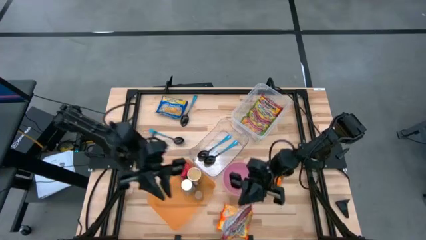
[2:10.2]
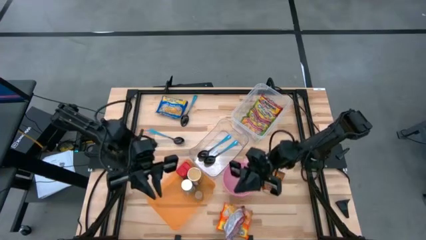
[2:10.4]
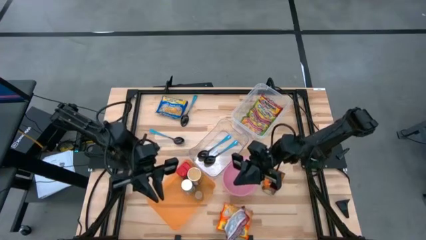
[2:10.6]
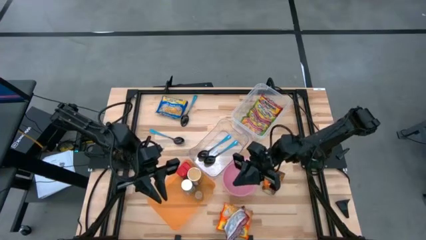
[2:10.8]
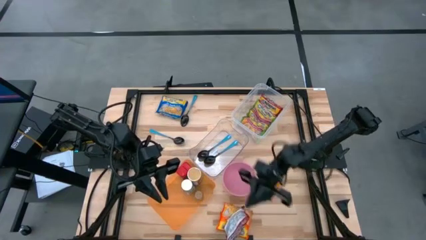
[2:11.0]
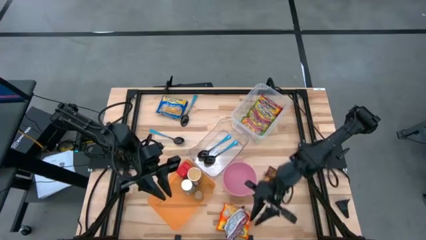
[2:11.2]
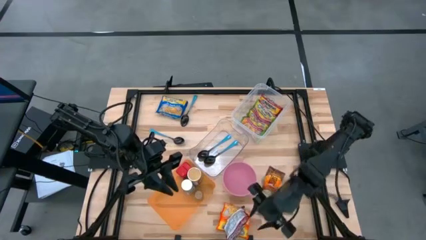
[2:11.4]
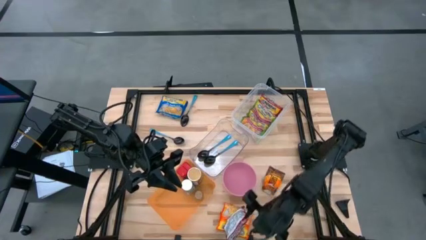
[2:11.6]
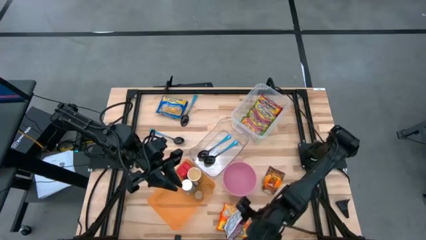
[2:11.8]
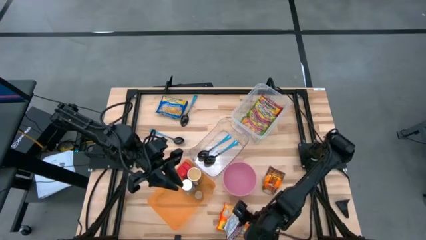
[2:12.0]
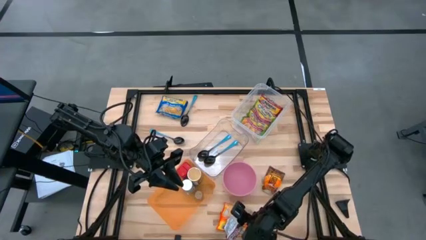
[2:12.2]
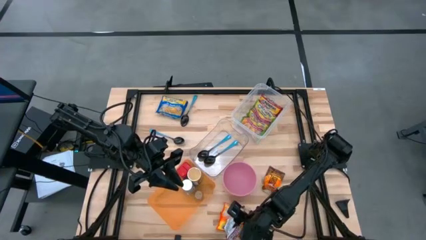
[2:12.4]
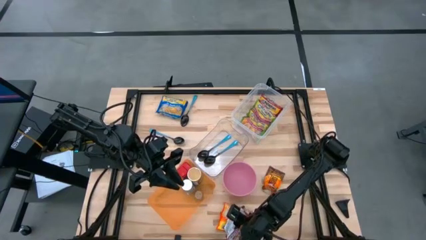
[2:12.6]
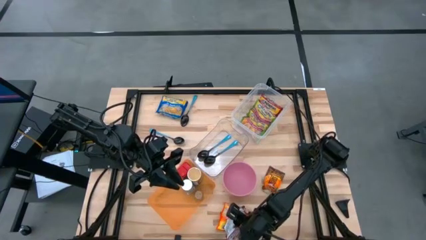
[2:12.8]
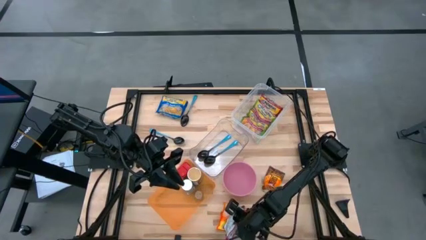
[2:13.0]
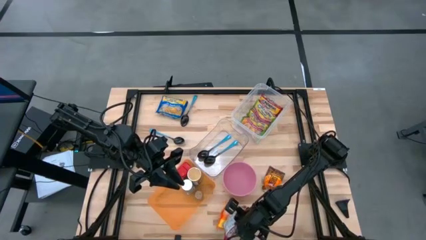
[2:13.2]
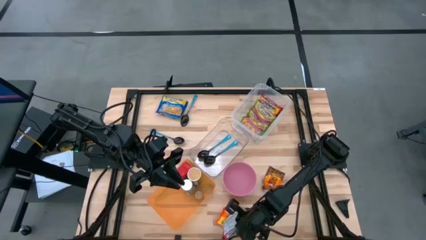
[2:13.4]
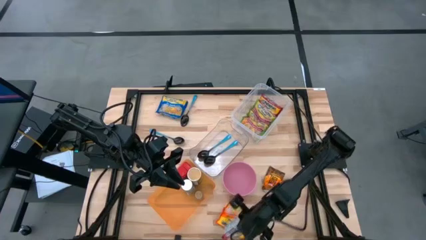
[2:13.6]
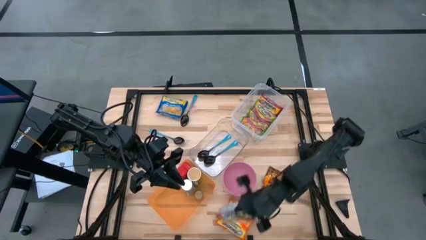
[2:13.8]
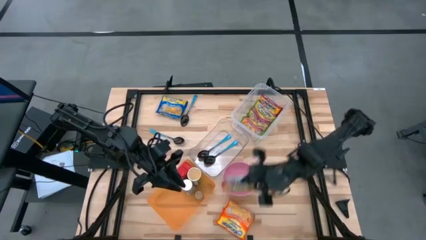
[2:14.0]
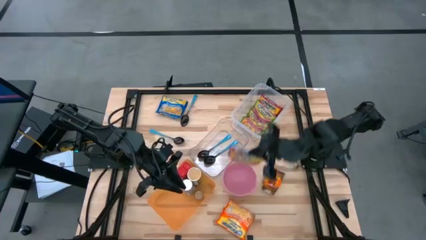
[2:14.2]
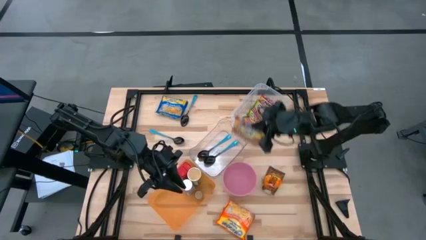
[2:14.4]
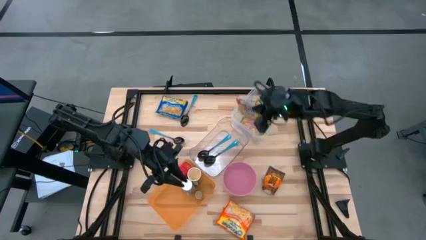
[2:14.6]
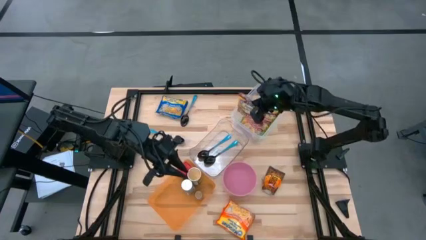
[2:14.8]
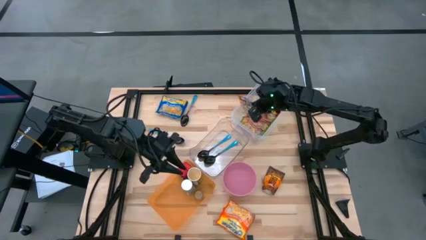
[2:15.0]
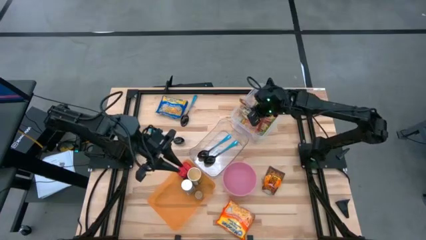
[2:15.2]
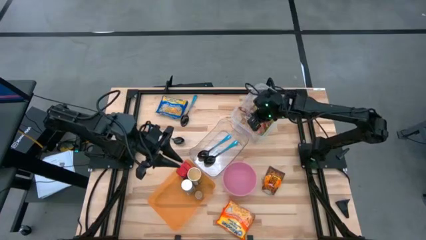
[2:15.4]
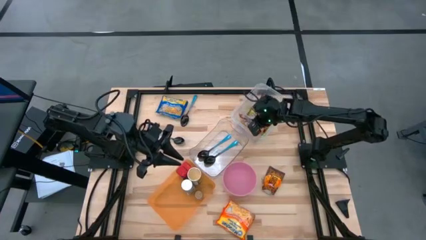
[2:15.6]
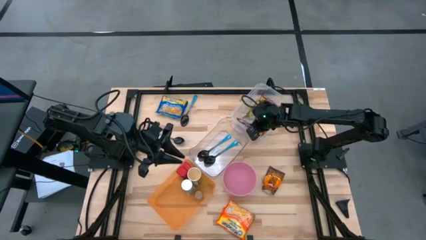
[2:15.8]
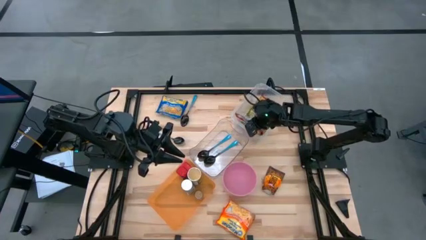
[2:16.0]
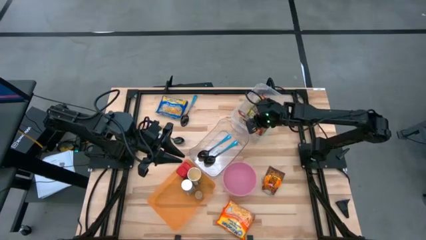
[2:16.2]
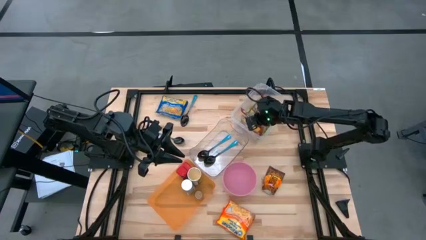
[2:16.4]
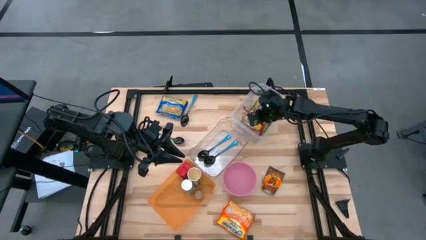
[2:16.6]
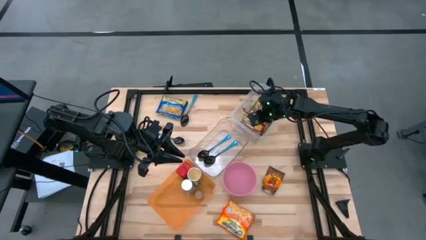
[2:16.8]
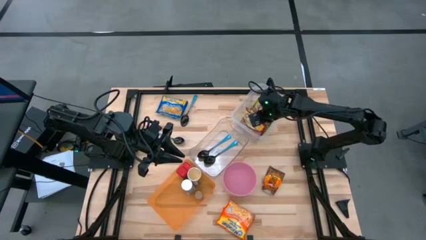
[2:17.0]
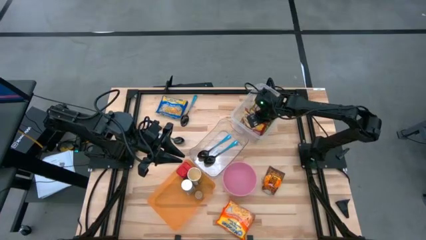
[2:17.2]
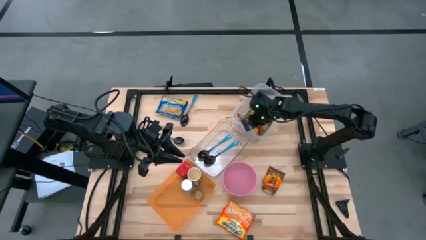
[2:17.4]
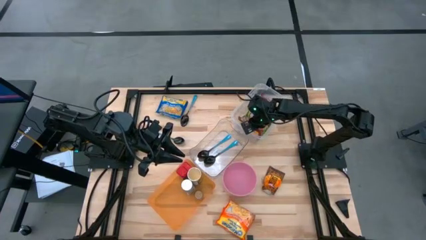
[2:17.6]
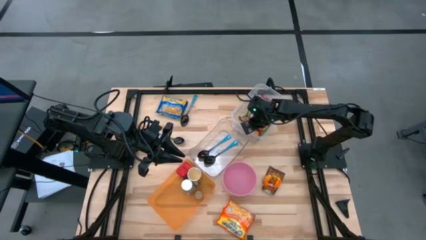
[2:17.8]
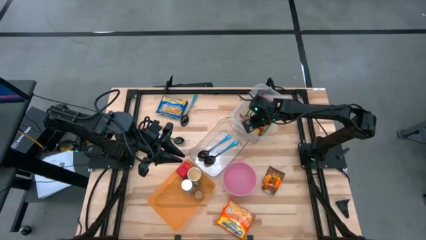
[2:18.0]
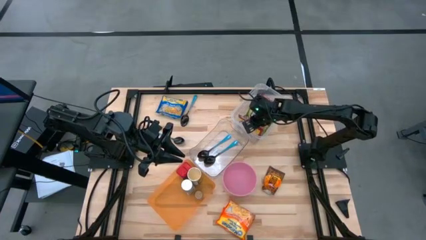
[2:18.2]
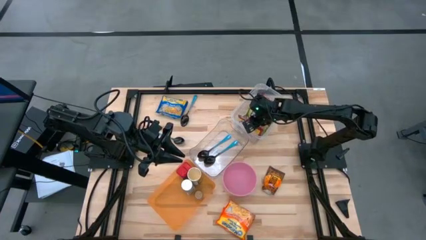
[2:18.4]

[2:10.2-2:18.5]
Task: Pick & Place Food Item
Put the red noodle pack into the transparent container

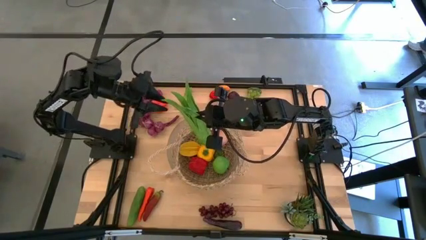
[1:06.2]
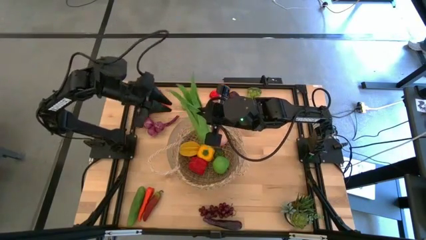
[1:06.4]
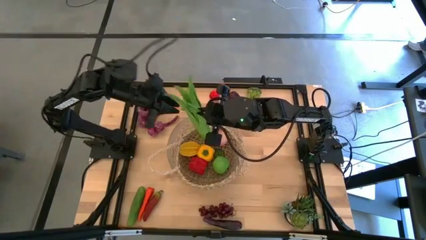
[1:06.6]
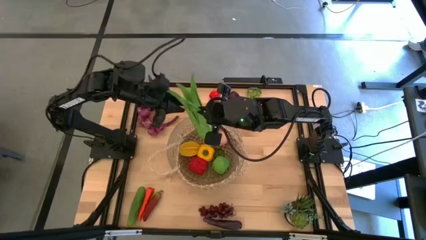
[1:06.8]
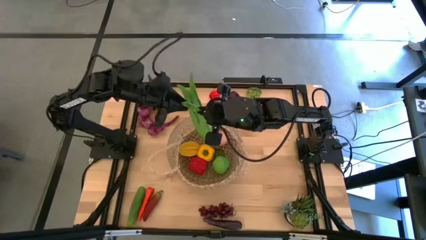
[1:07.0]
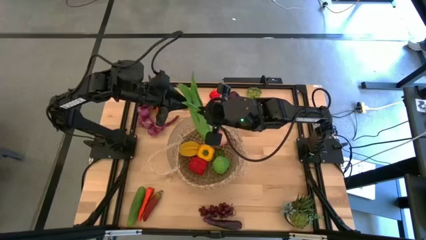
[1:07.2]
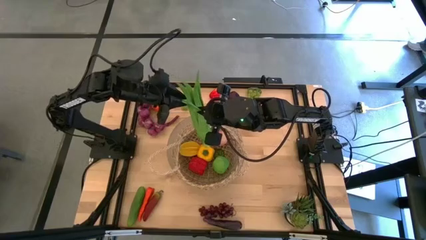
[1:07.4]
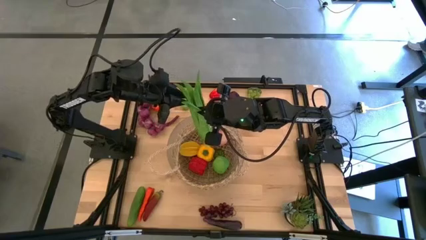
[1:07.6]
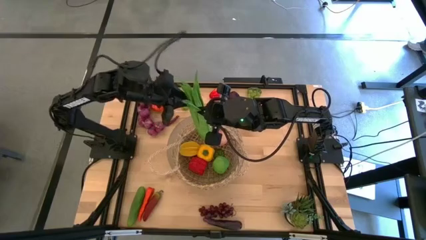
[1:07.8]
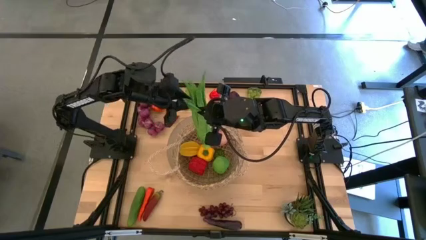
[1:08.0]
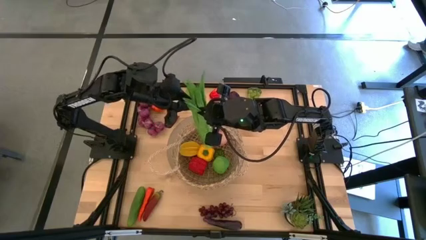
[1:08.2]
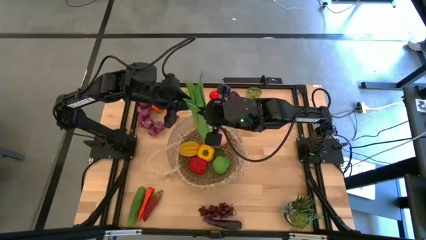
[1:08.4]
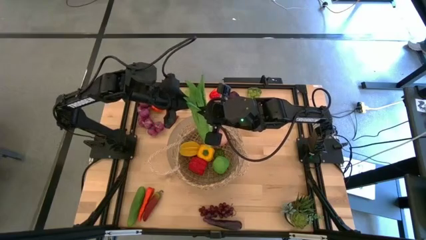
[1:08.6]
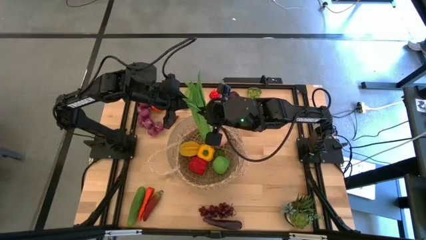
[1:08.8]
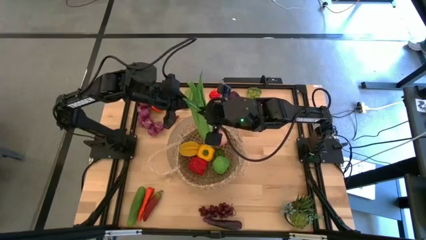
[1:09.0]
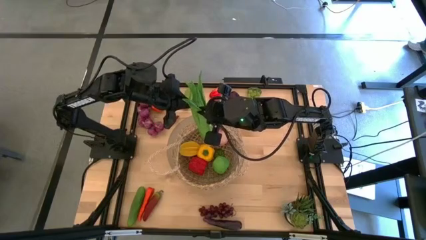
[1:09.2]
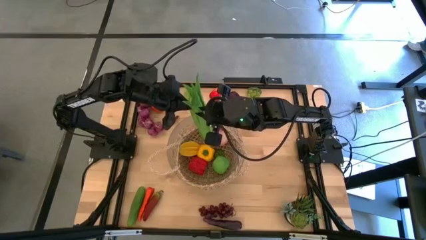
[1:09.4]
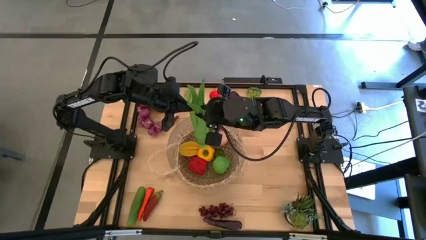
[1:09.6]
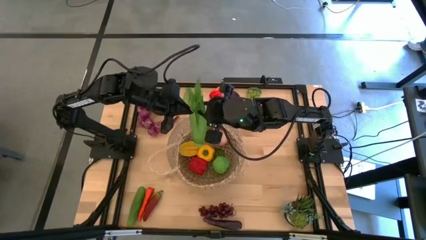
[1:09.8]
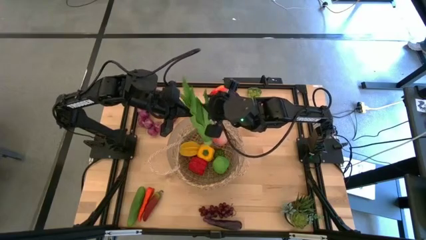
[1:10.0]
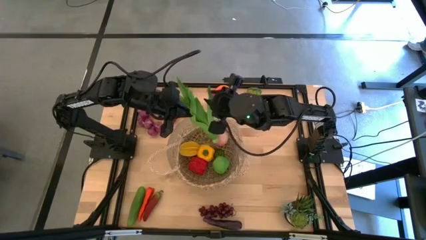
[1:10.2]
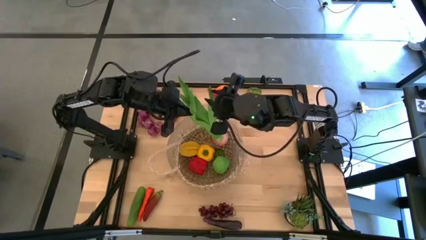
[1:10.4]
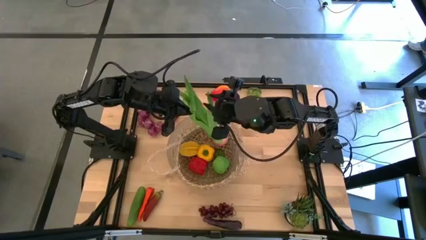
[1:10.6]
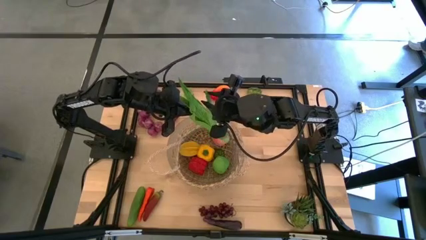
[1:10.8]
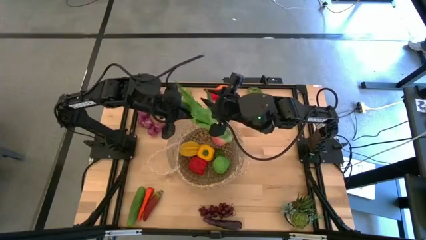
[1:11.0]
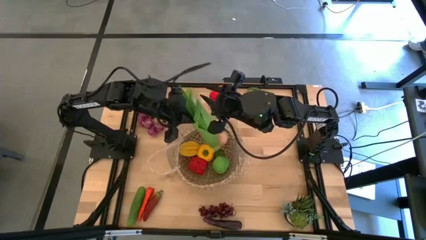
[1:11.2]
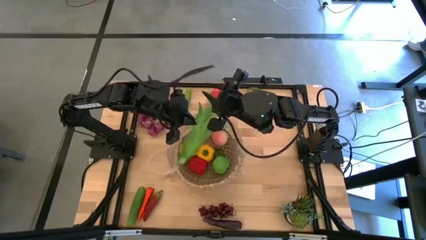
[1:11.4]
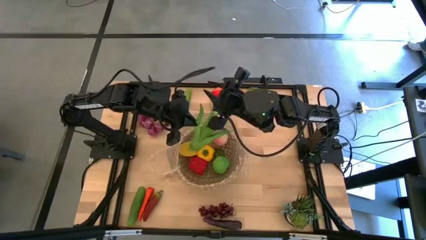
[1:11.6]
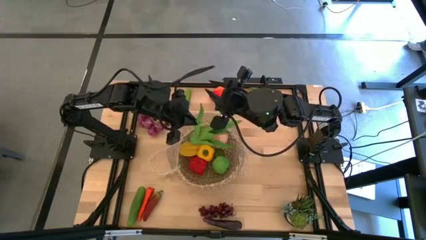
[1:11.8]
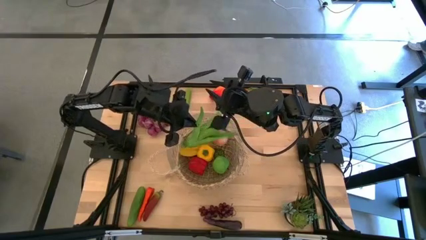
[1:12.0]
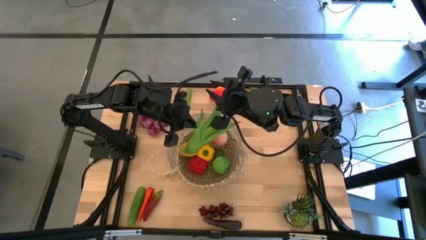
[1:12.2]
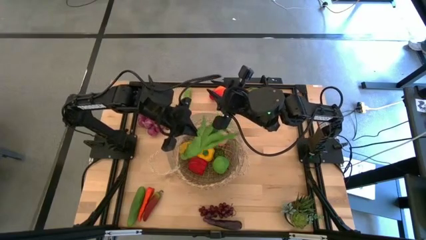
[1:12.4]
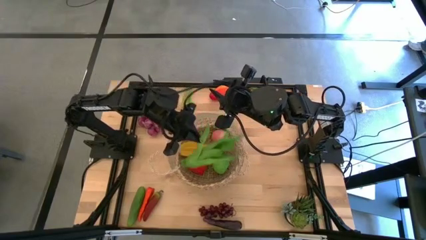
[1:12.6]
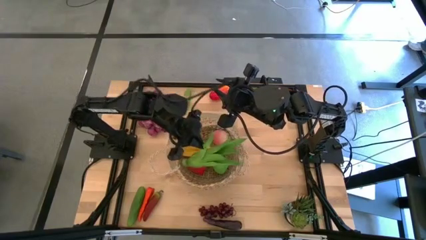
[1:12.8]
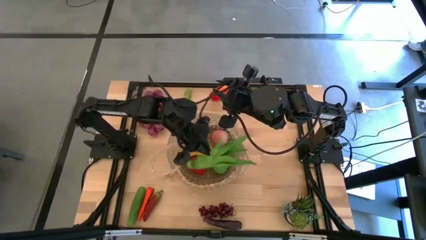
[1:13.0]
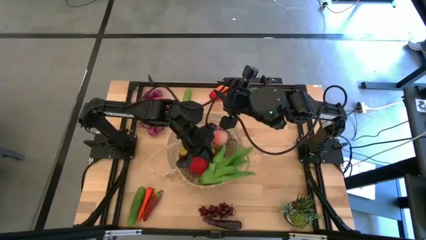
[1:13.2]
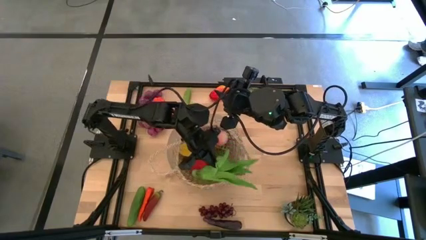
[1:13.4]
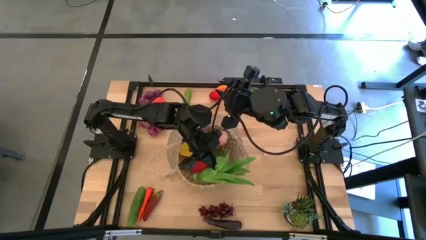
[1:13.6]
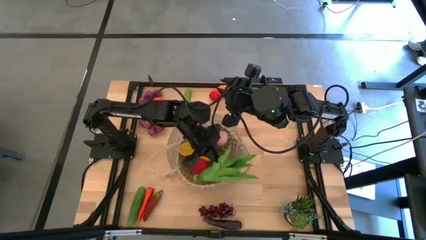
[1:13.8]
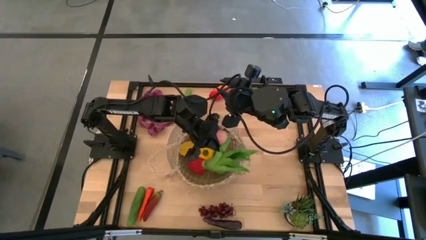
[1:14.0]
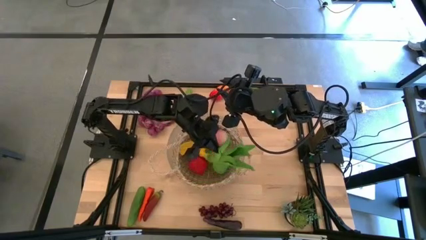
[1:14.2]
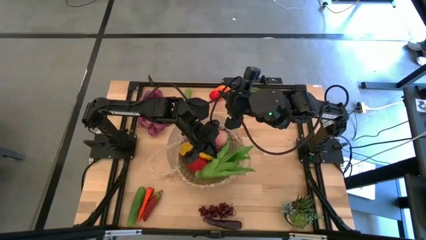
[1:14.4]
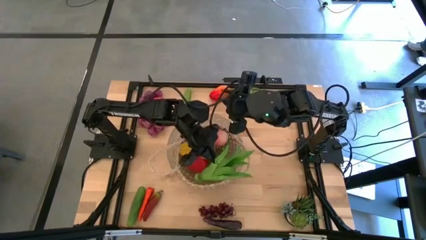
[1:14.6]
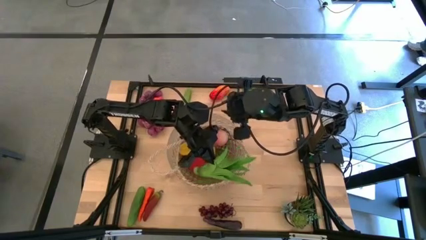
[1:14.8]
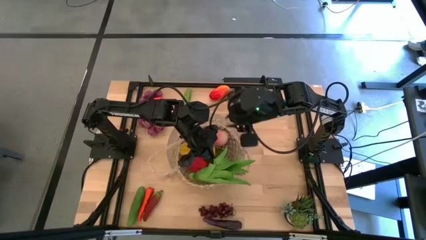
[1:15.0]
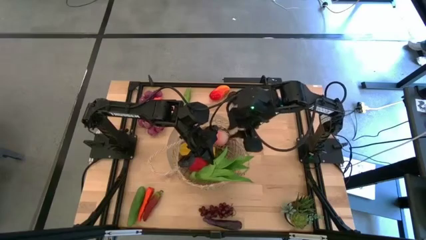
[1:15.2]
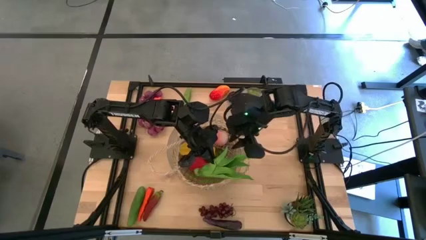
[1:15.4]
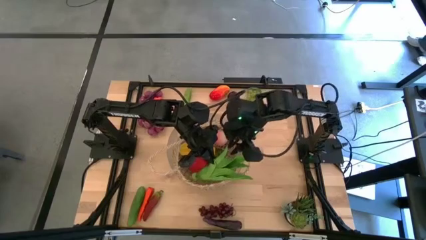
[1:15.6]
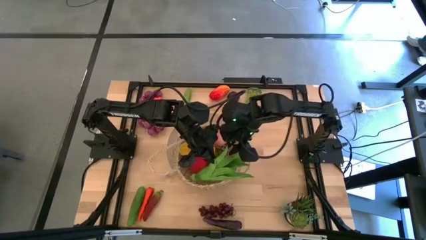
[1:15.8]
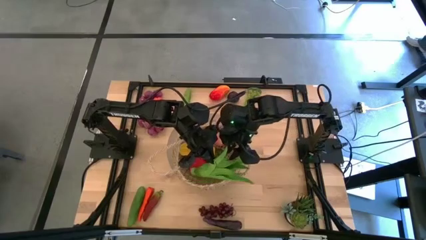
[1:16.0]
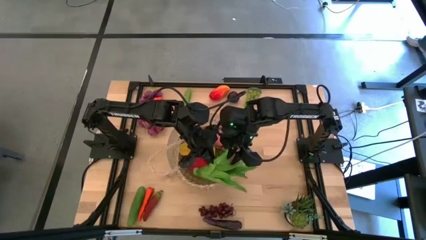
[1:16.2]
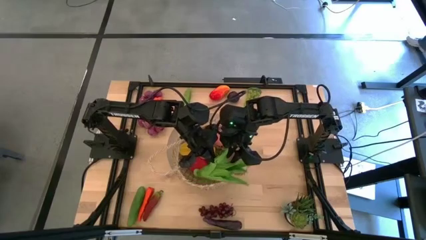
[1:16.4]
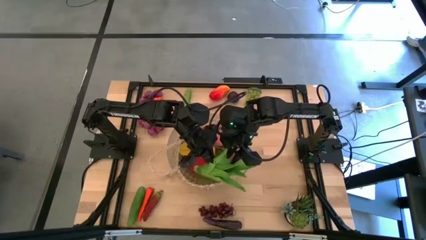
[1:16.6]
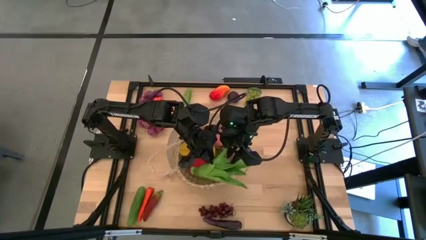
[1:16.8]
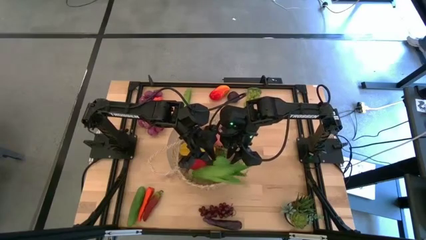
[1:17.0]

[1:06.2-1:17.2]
Task: Build produce basket
Put the green leaf lettuce into the brown basket
